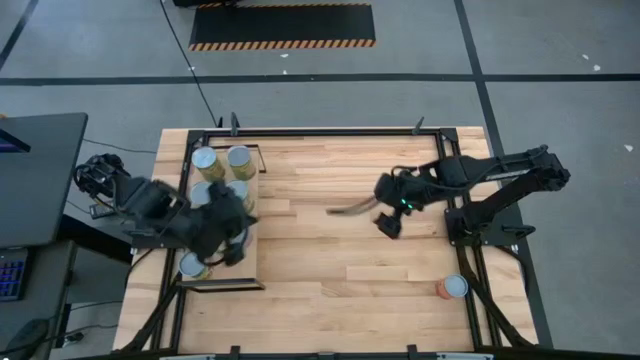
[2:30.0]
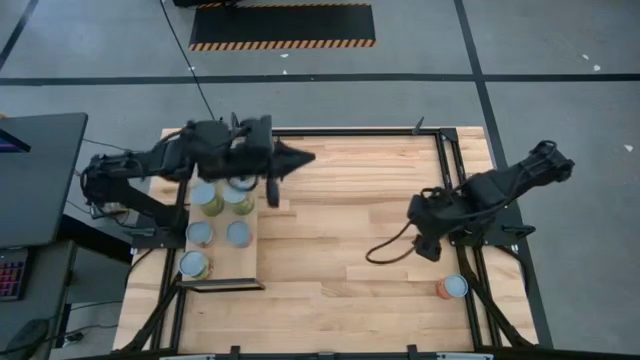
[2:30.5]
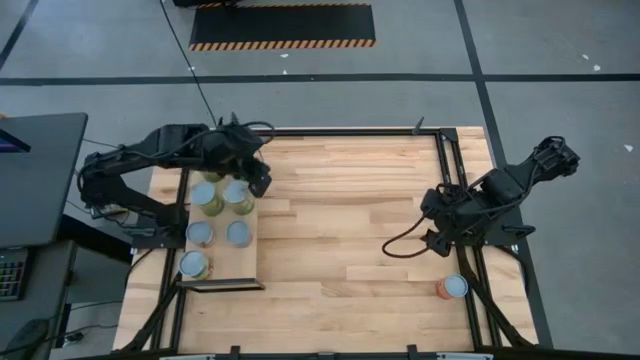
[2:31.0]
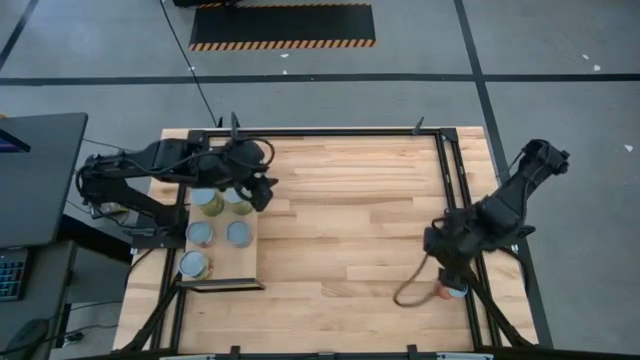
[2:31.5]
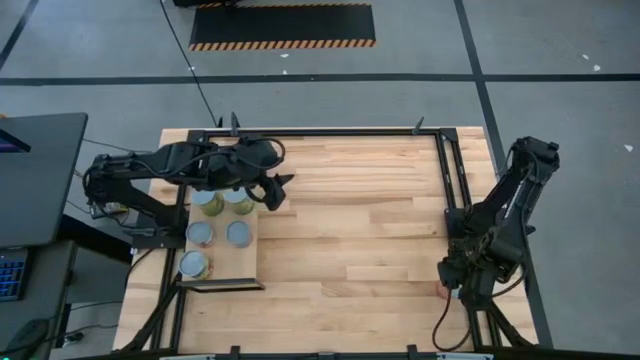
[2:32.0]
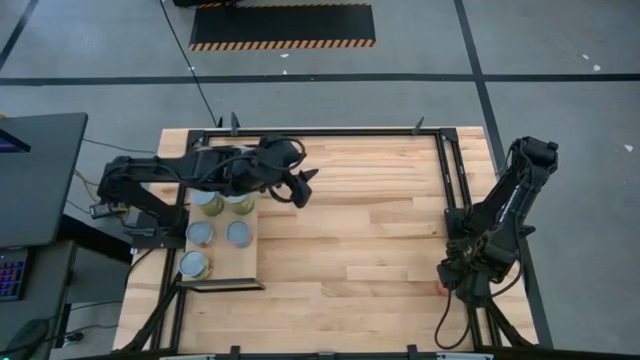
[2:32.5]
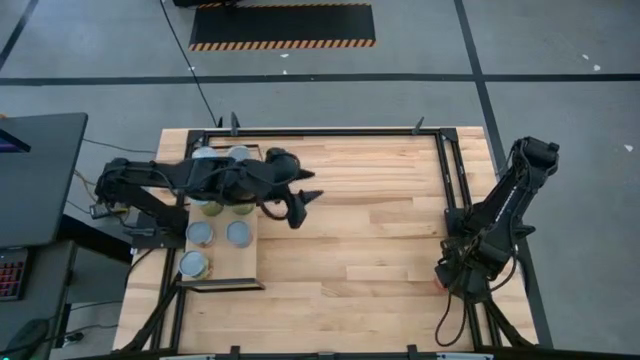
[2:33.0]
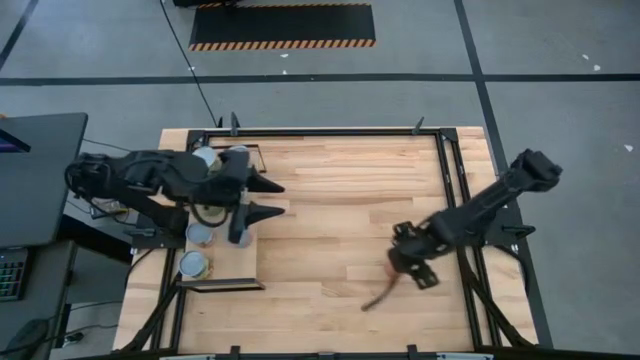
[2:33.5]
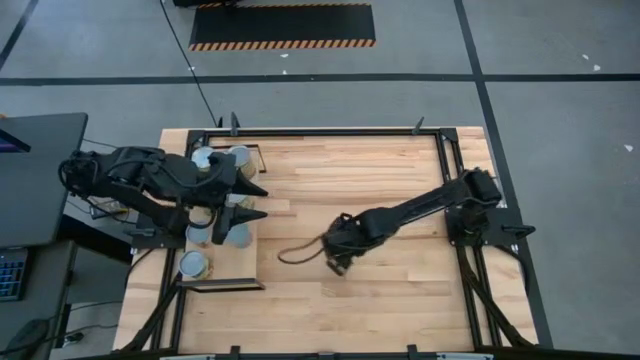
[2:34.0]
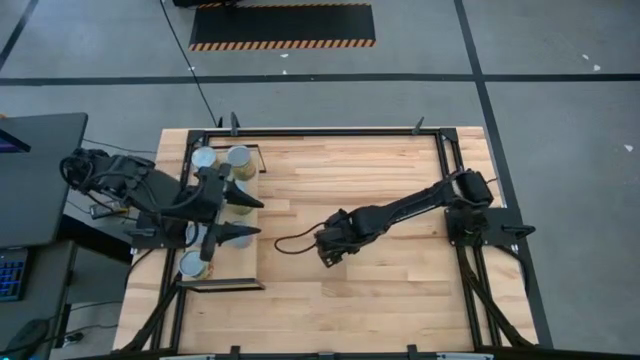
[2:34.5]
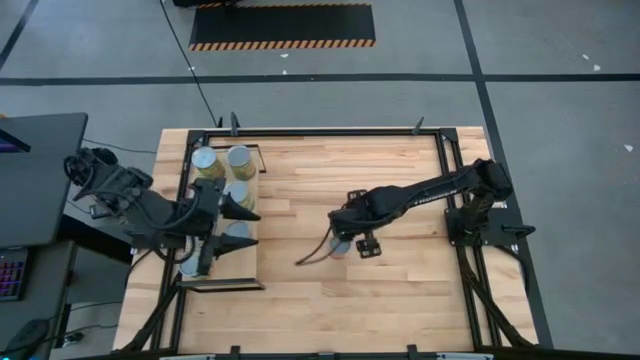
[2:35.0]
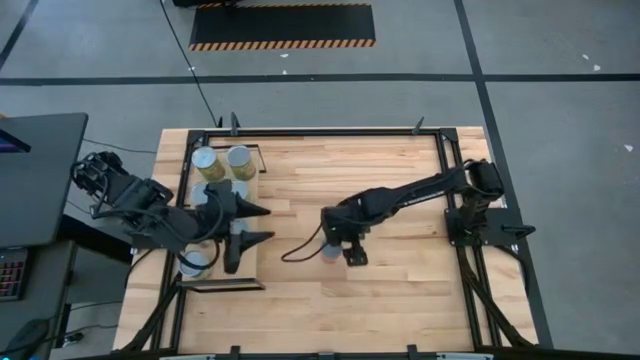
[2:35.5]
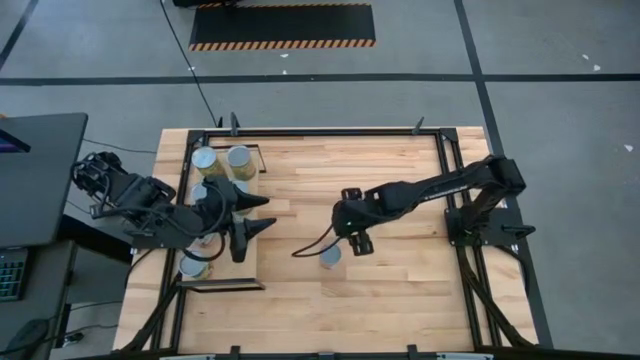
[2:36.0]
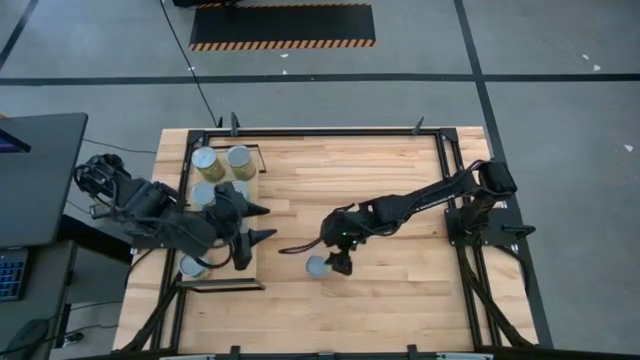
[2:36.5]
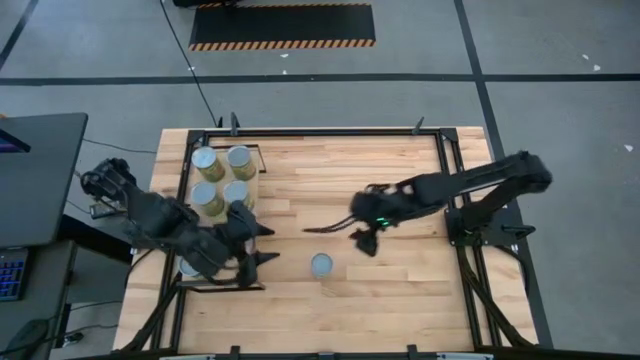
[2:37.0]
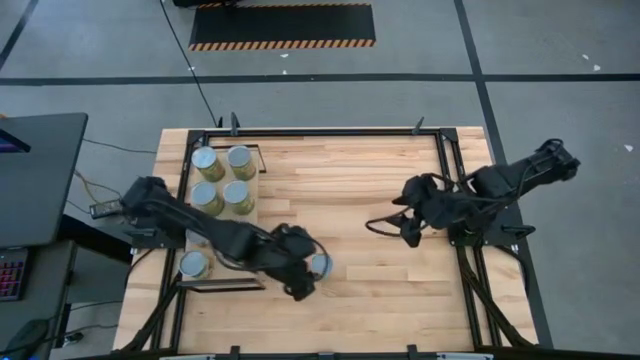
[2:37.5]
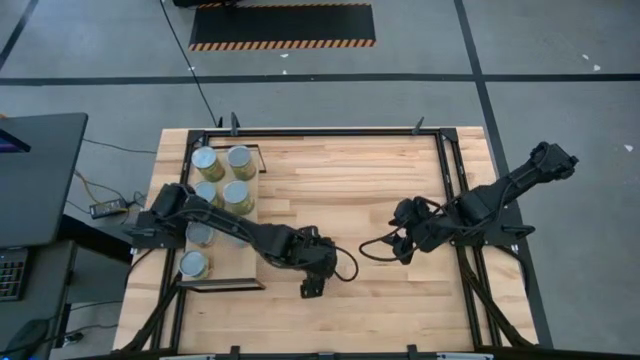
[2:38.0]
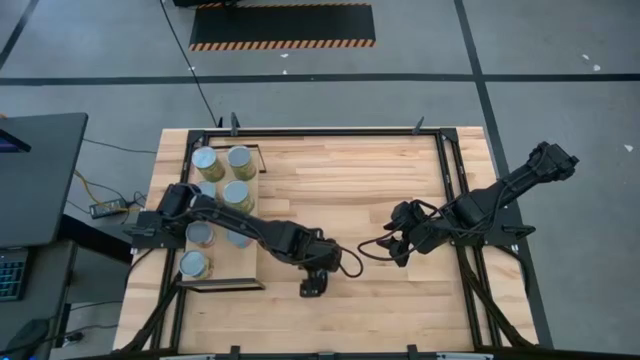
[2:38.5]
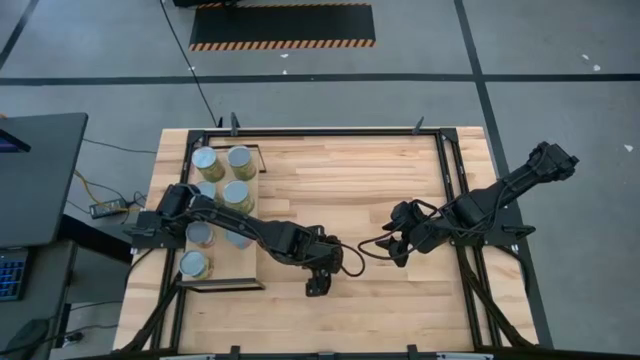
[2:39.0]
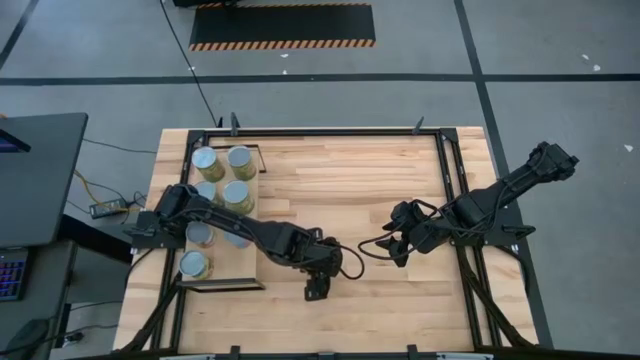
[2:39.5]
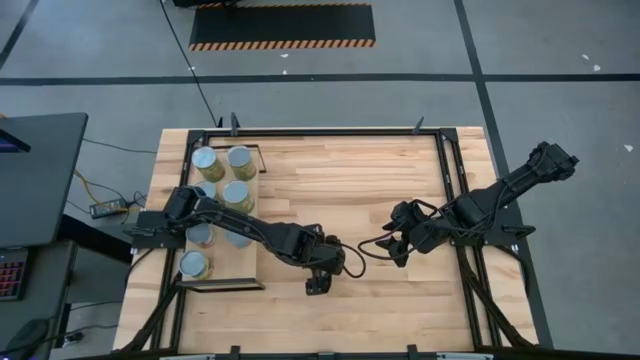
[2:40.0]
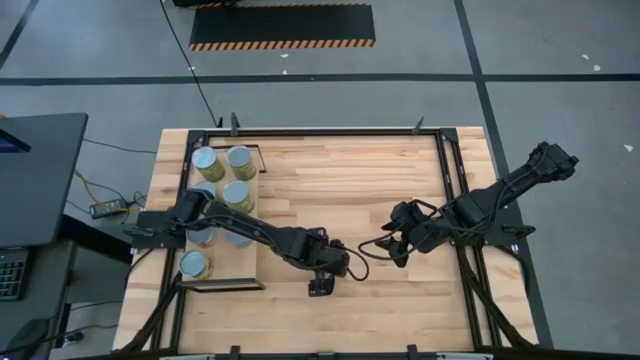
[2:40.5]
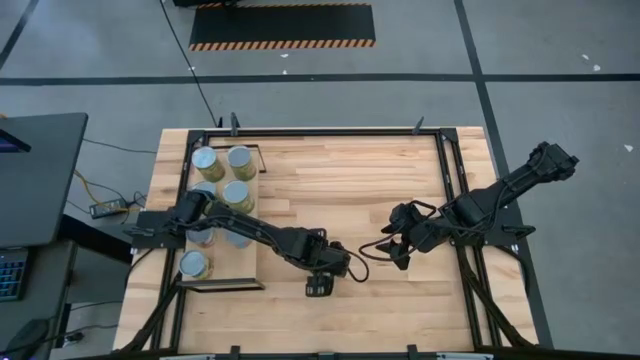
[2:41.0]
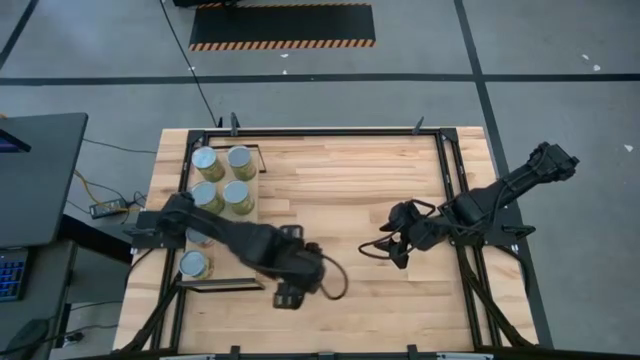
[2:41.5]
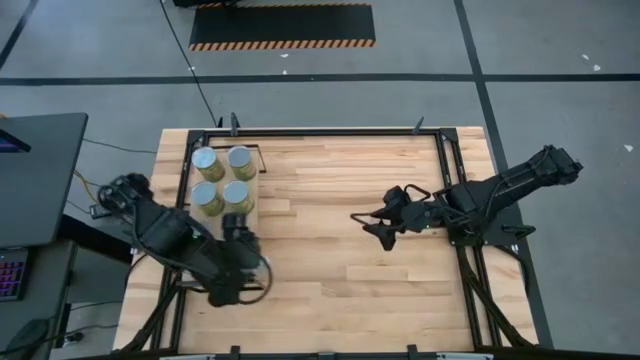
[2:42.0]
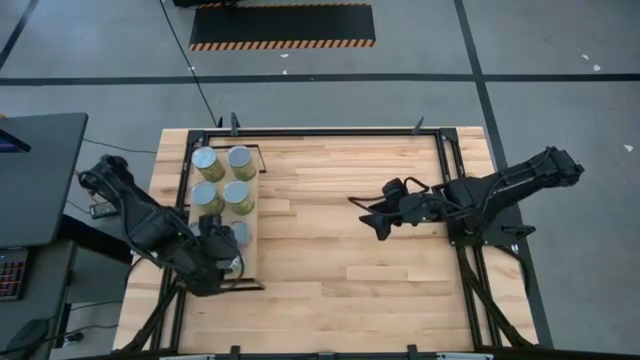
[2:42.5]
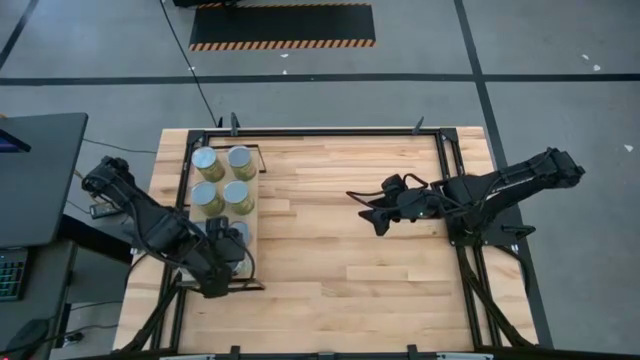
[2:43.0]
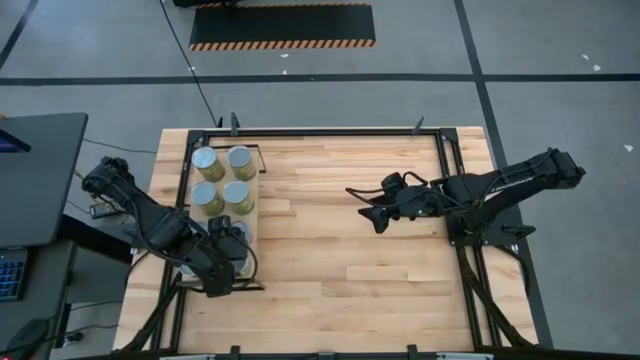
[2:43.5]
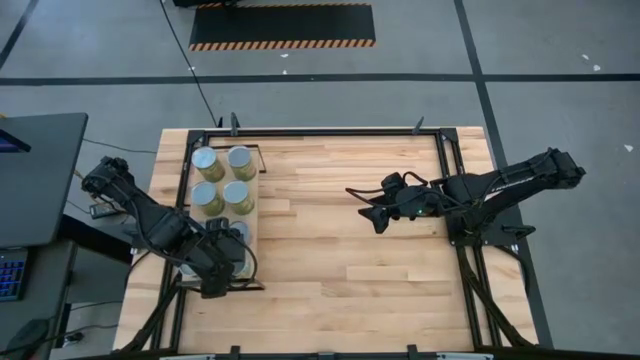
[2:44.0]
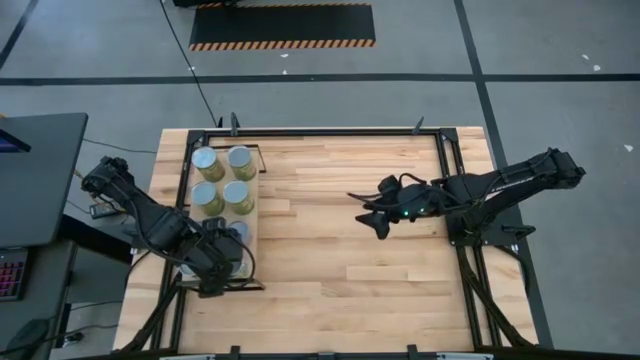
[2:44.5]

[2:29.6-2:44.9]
Task: Pick and place cans onto a shelf
Put the canned mixed fruits on the shelf

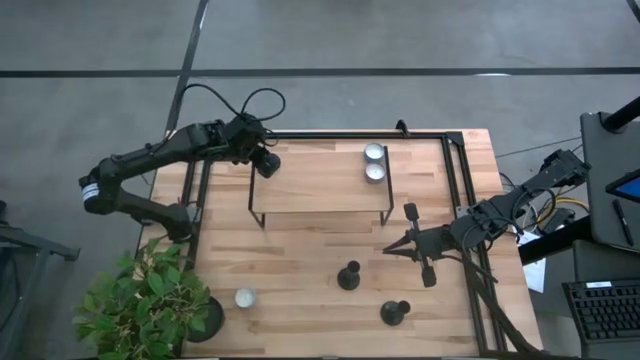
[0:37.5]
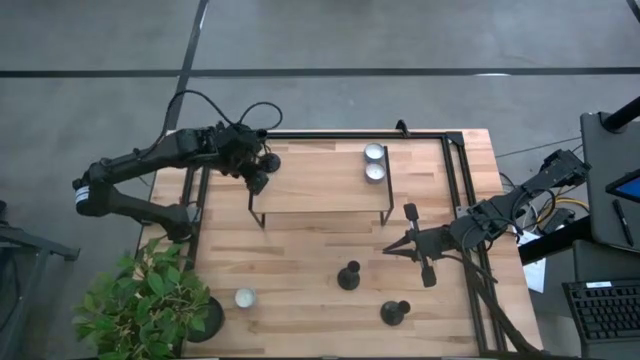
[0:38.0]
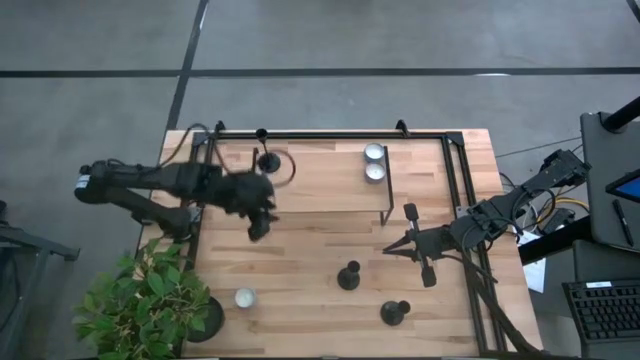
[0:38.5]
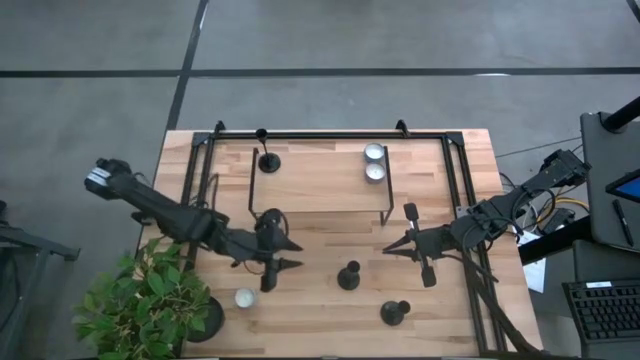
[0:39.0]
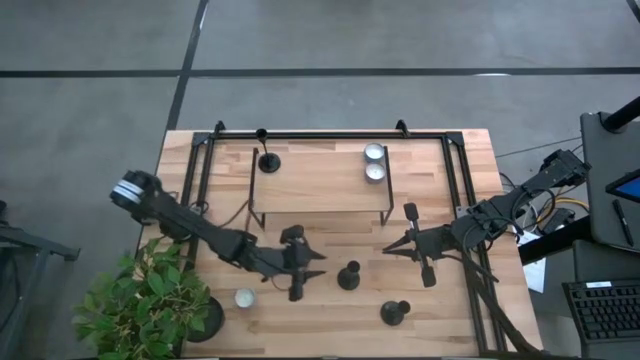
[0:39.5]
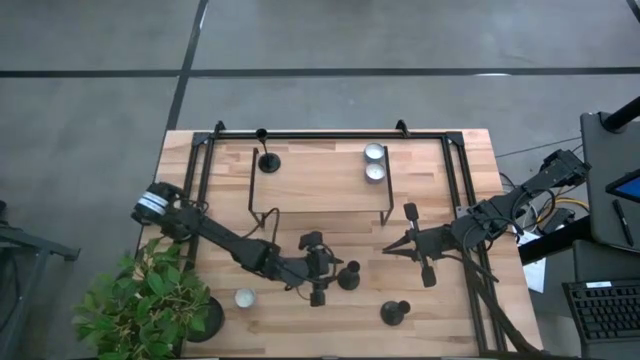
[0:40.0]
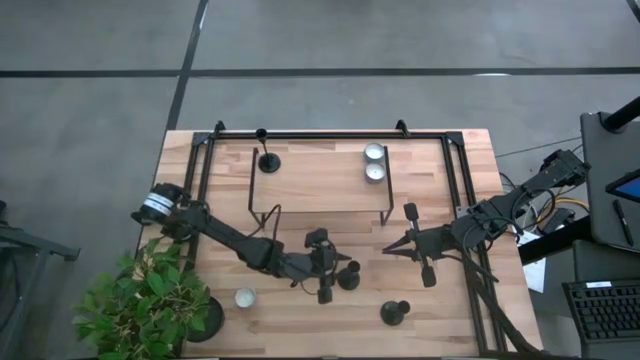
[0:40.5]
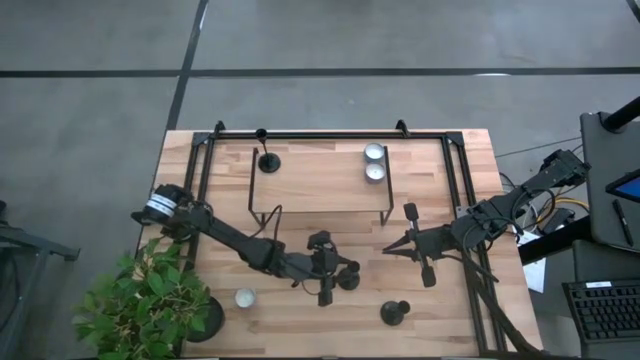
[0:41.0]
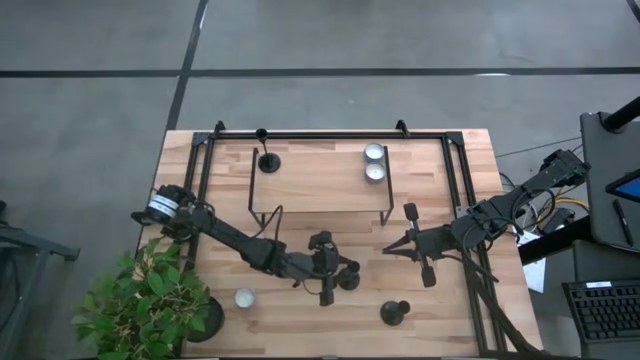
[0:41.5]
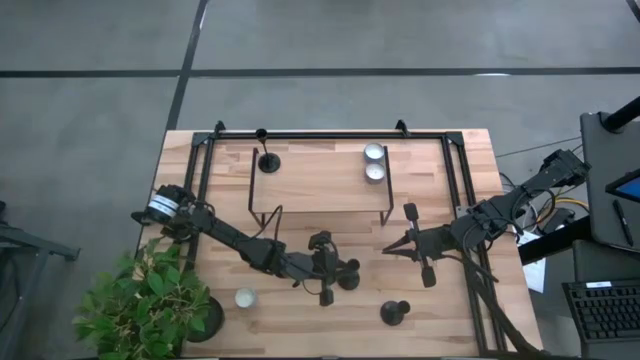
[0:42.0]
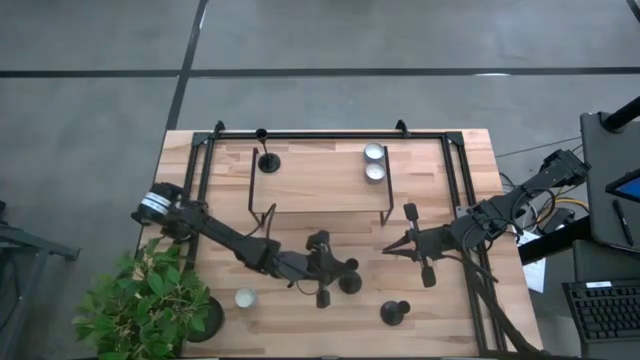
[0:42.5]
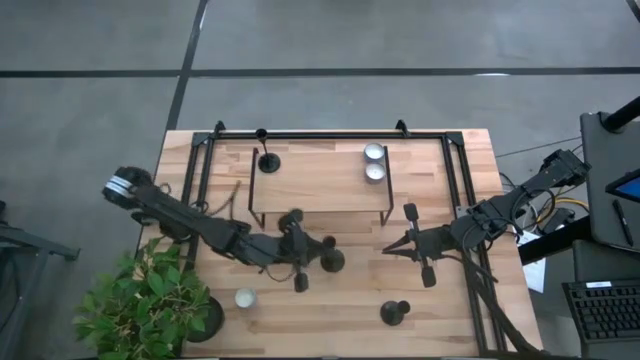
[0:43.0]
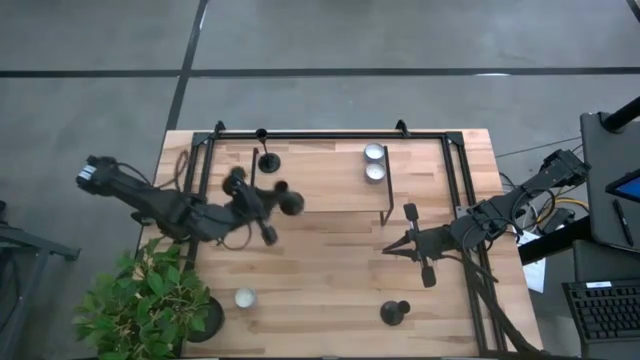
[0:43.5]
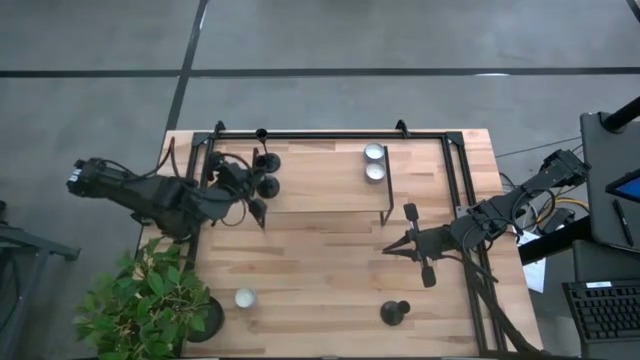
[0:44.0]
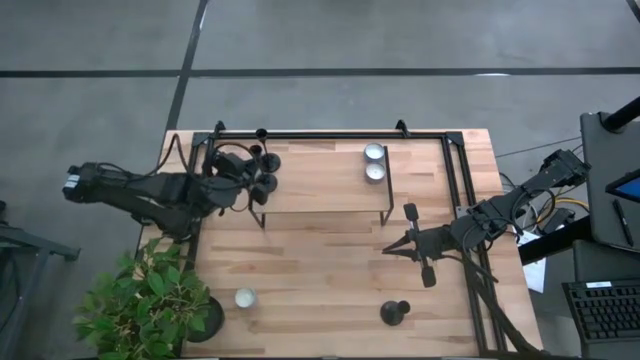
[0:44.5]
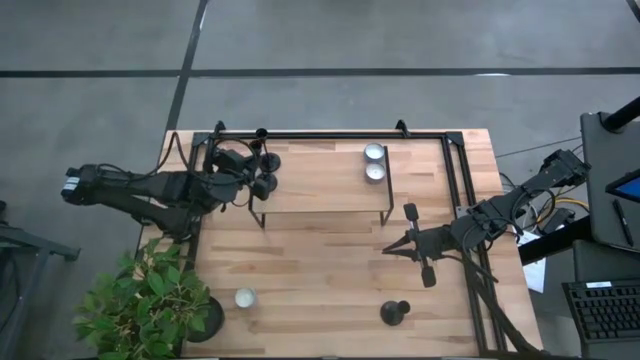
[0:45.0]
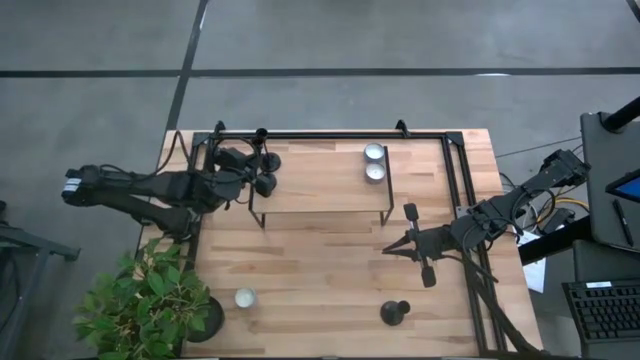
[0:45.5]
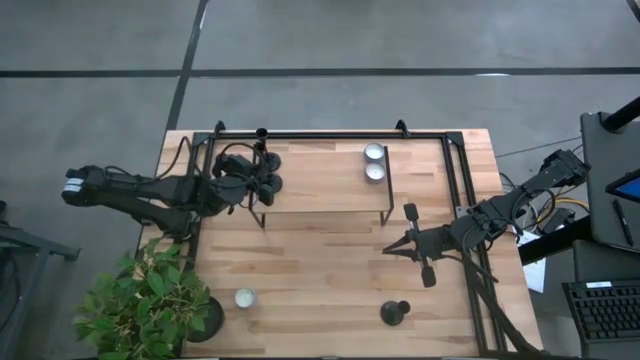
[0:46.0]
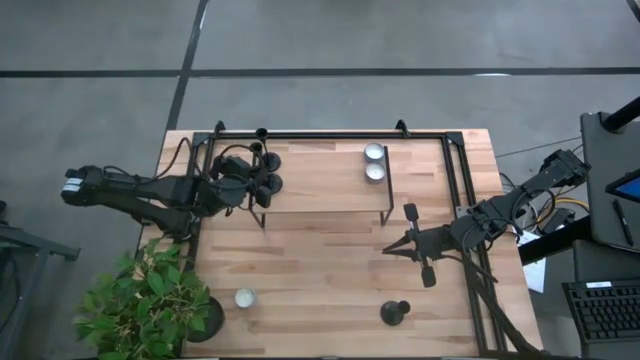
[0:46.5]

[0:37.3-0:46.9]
Task: Pick & Place candle stick holders
Put the top black holder on the shelf
